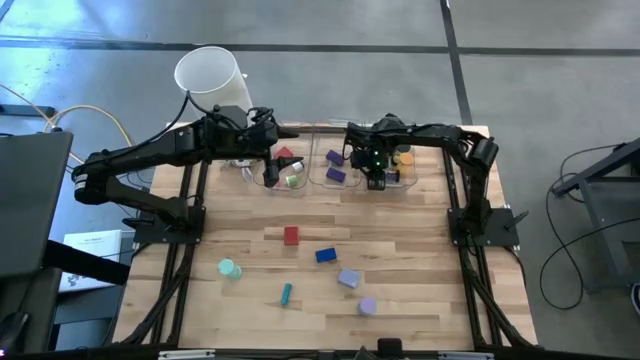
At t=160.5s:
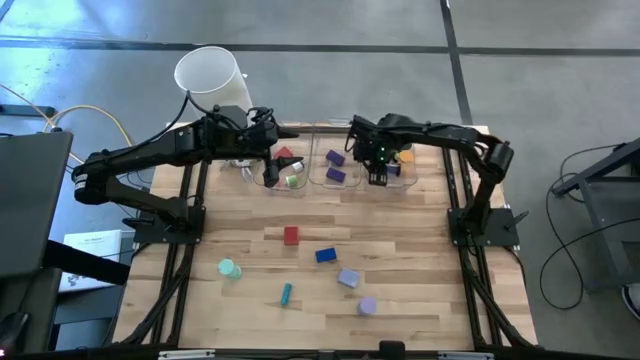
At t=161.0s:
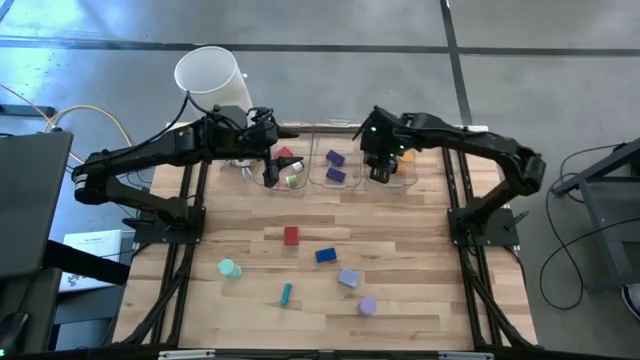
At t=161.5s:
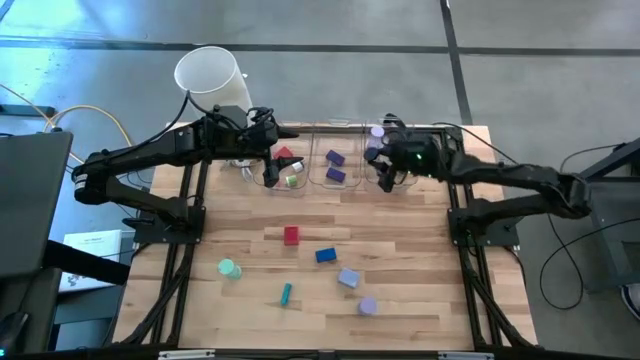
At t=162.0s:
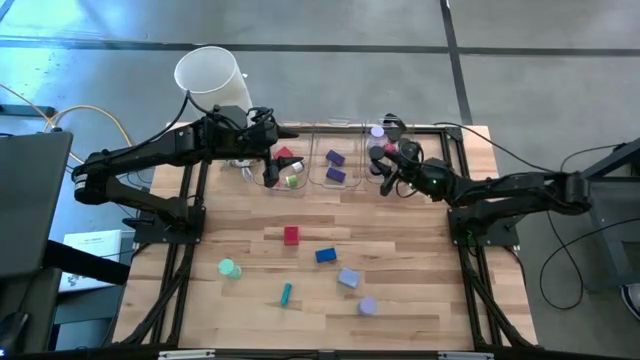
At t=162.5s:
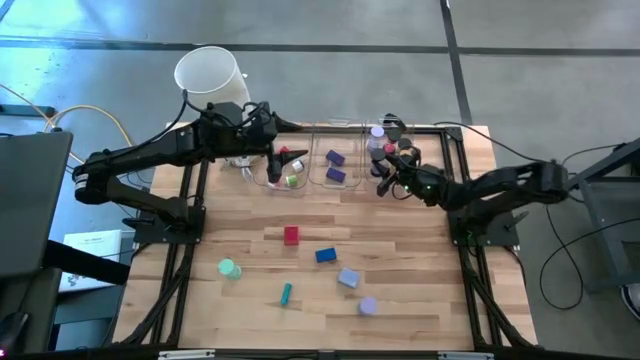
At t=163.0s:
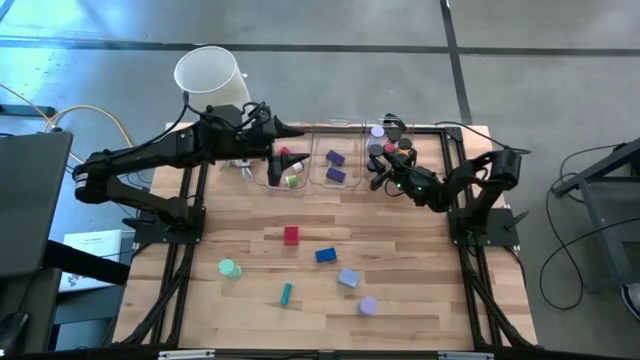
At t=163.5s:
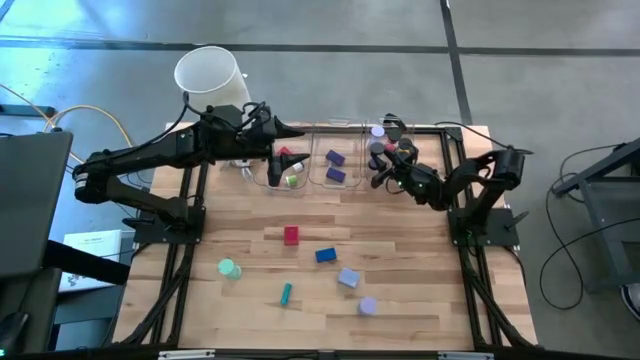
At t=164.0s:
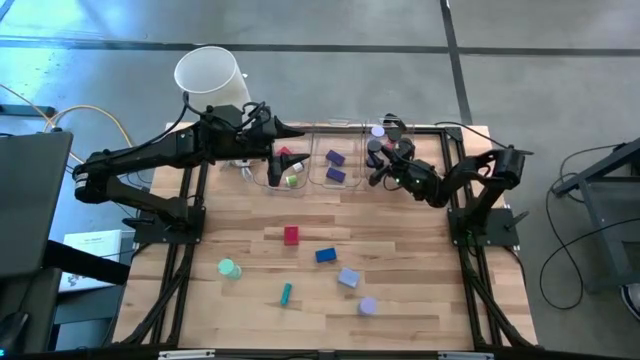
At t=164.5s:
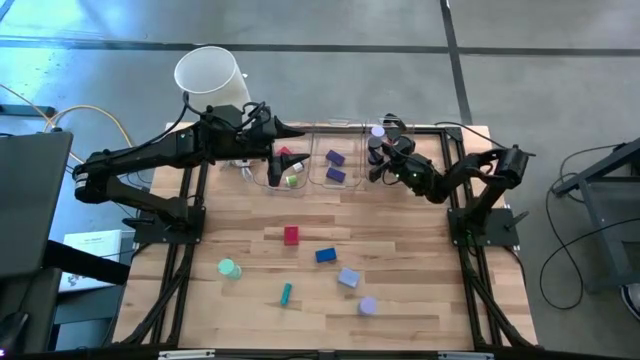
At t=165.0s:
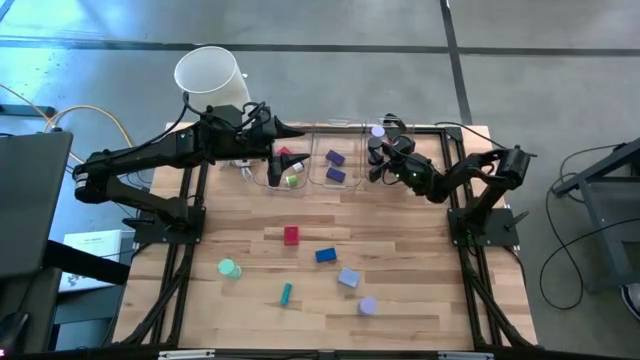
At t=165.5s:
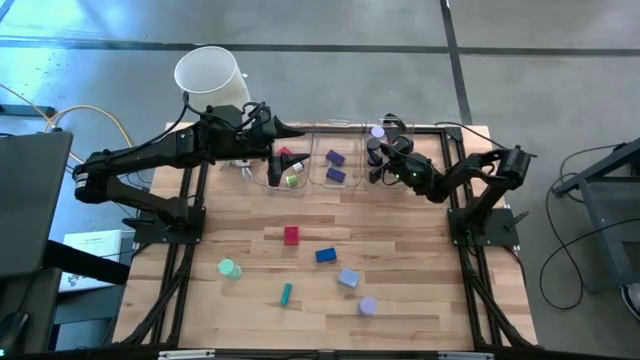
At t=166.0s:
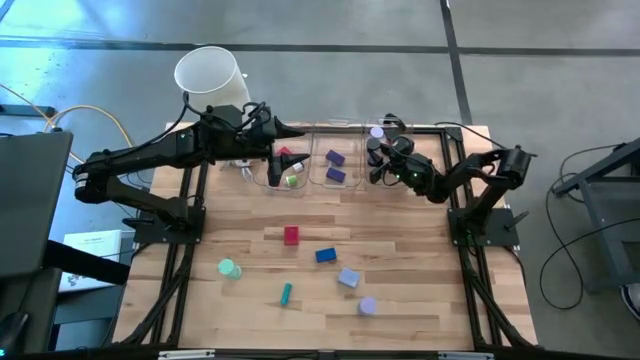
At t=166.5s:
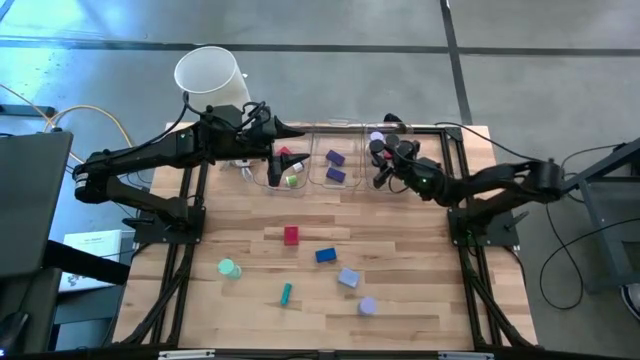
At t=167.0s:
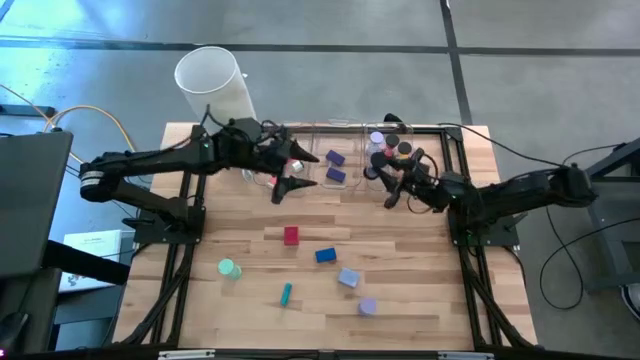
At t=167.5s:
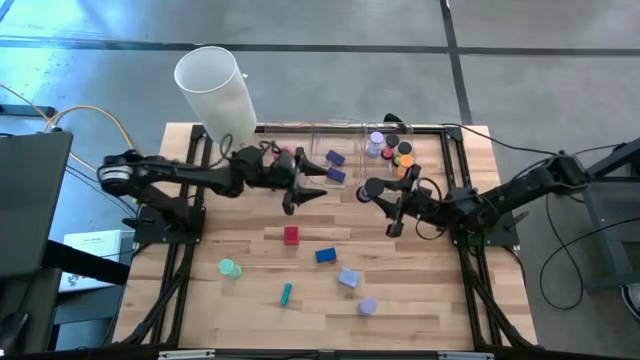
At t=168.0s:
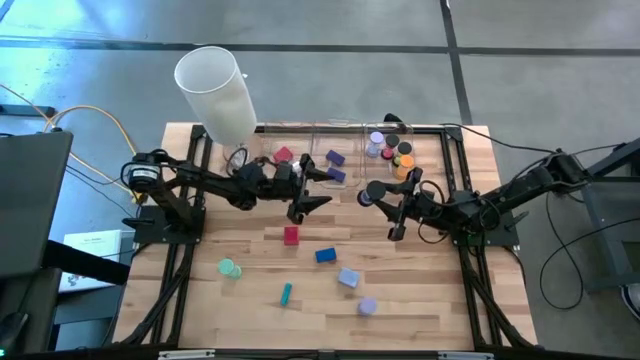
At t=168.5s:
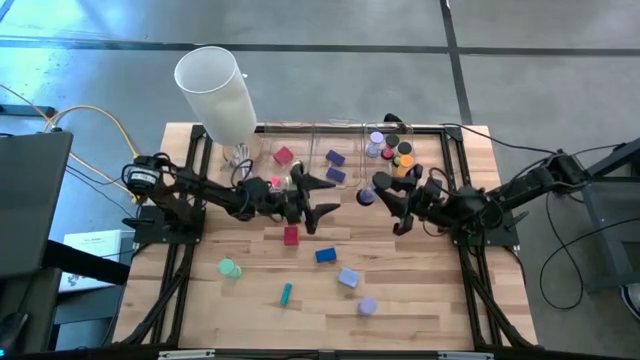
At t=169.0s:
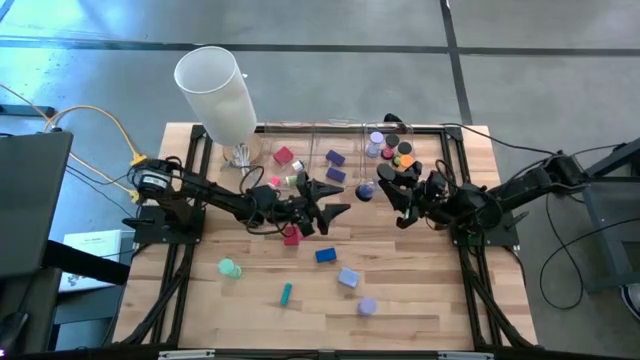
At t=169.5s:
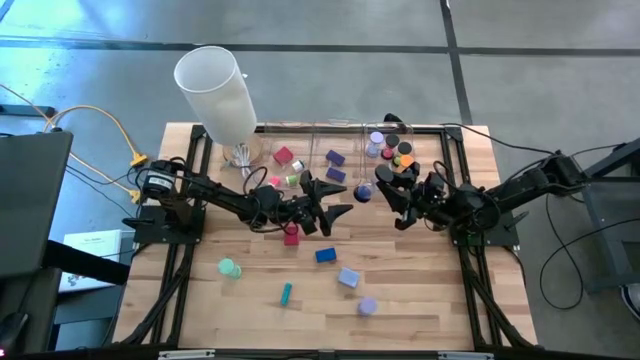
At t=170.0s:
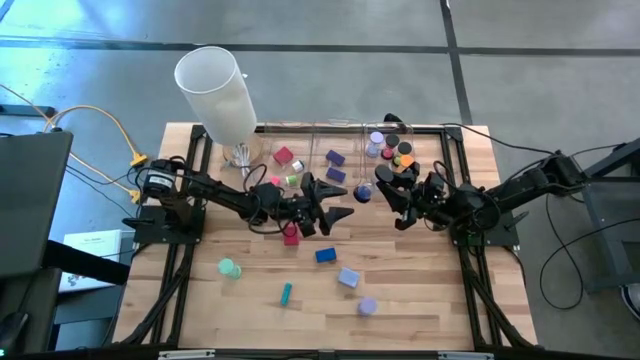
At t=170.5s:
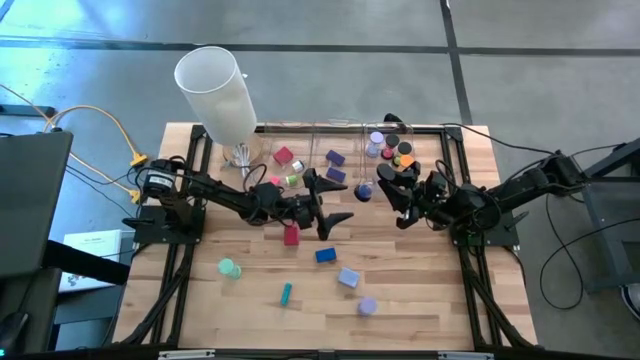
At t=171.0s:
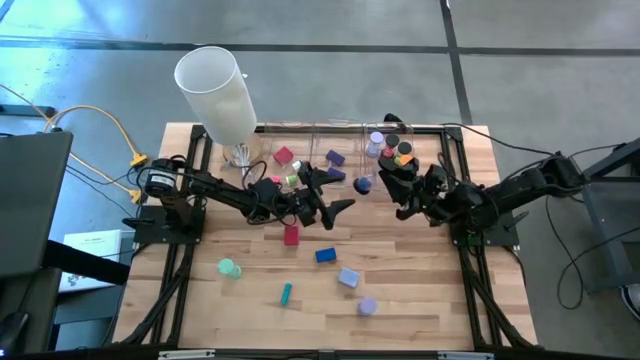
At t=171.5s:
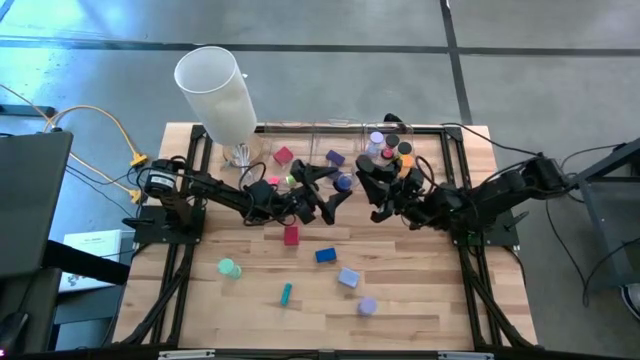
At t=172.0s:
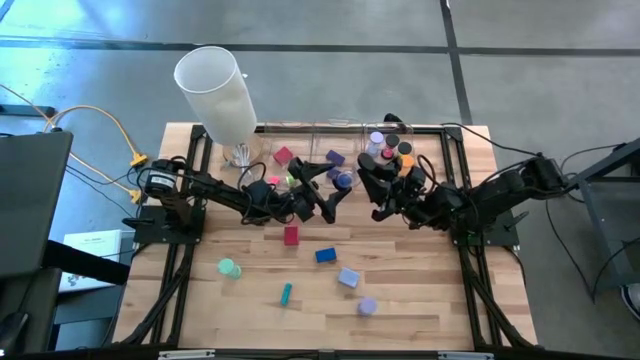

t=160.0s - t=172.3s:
Task: Pick & Place Office items
Put the blue hourglass into the right transparent bin

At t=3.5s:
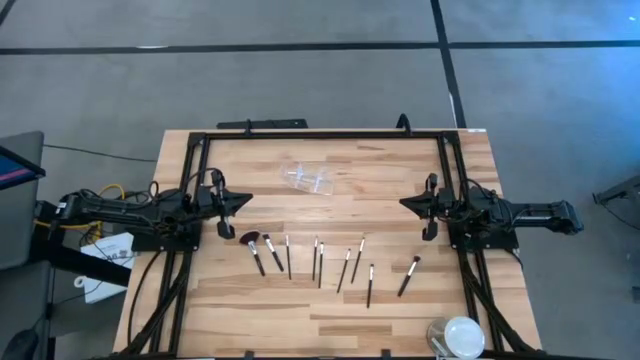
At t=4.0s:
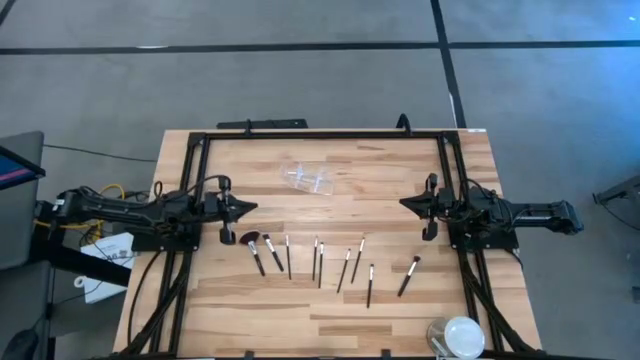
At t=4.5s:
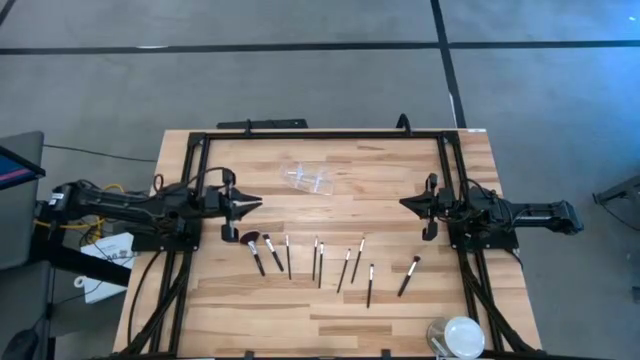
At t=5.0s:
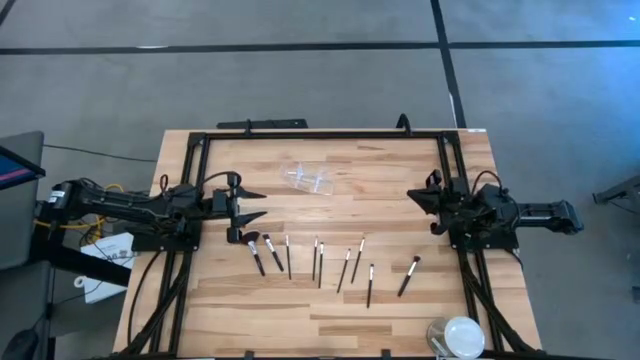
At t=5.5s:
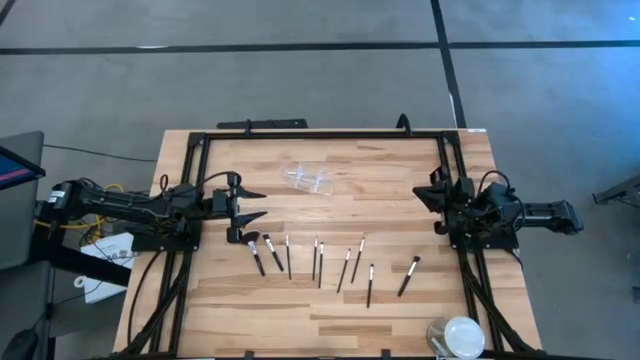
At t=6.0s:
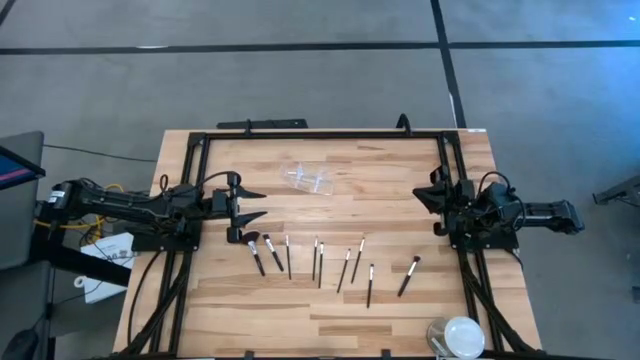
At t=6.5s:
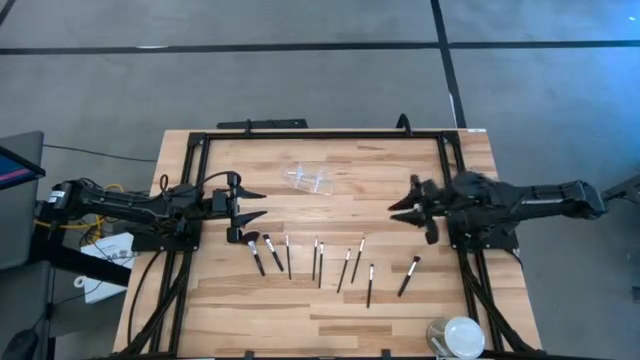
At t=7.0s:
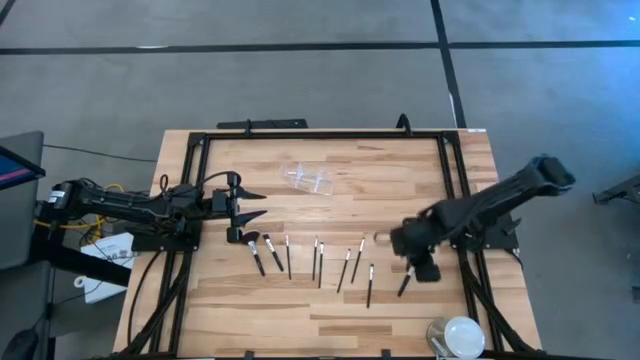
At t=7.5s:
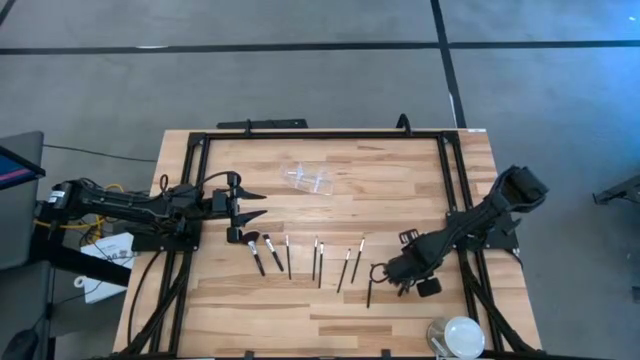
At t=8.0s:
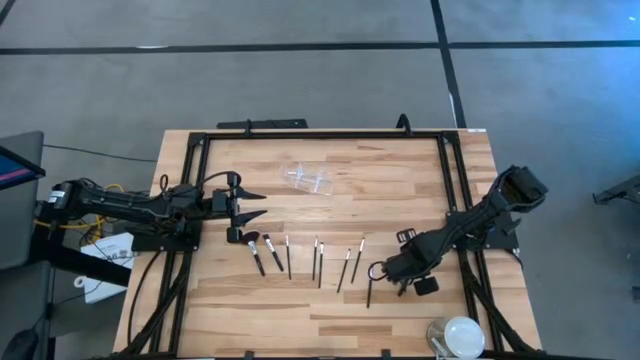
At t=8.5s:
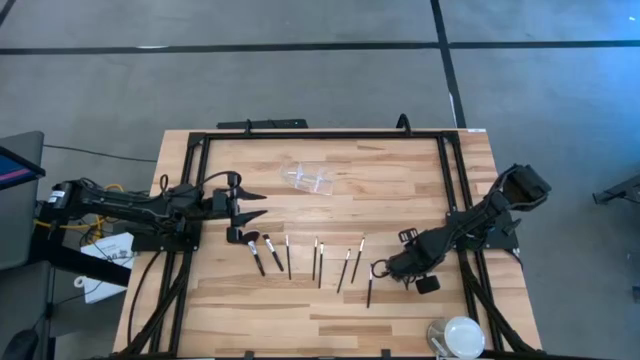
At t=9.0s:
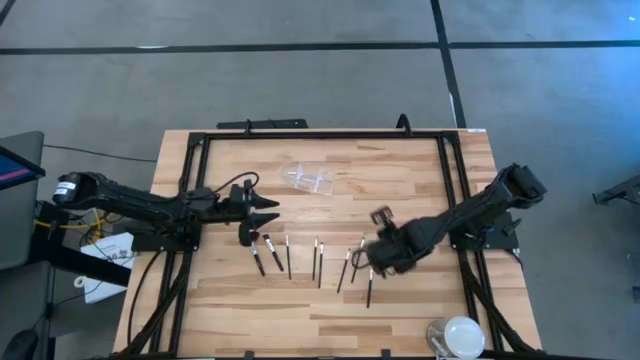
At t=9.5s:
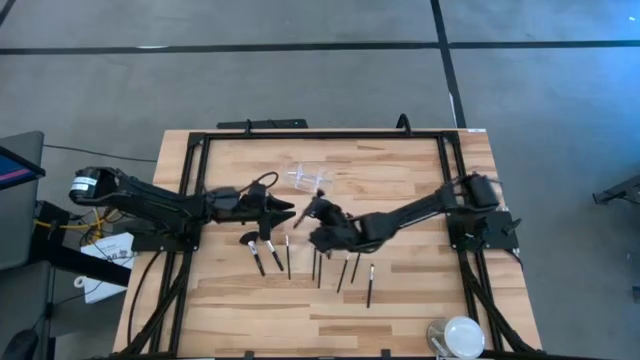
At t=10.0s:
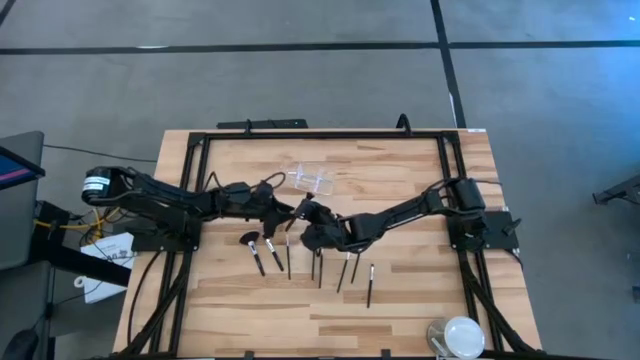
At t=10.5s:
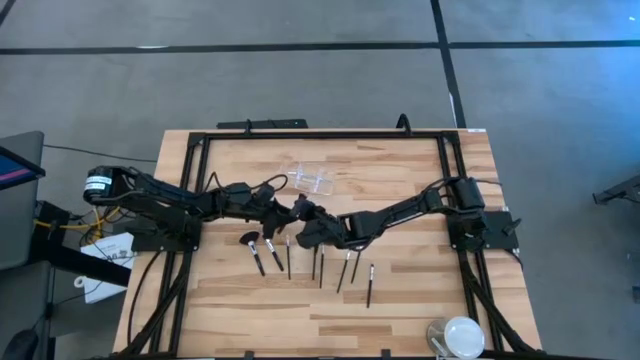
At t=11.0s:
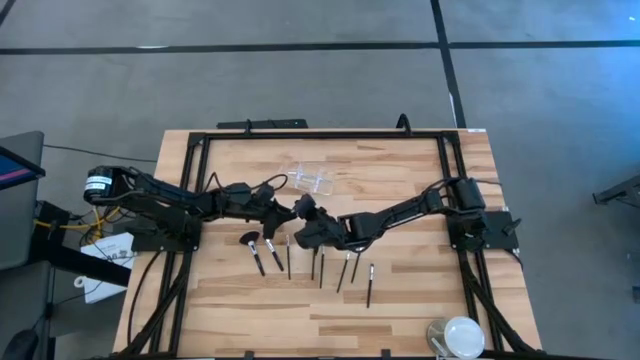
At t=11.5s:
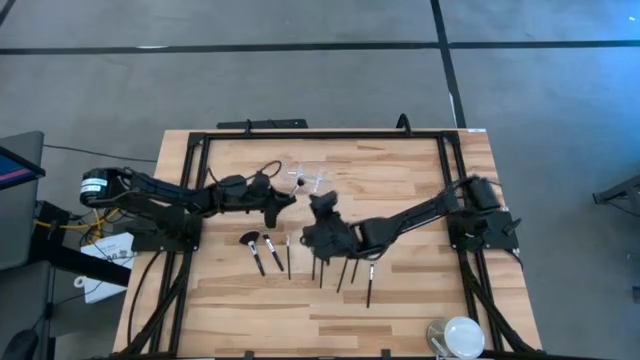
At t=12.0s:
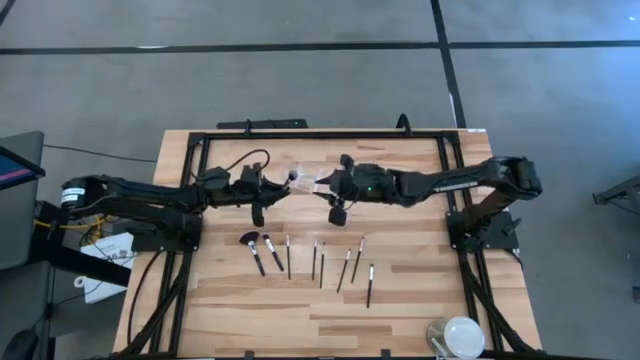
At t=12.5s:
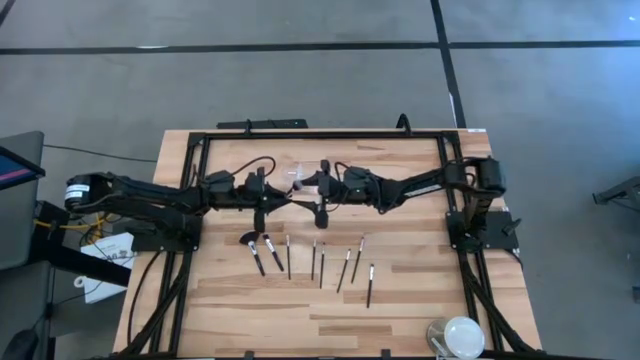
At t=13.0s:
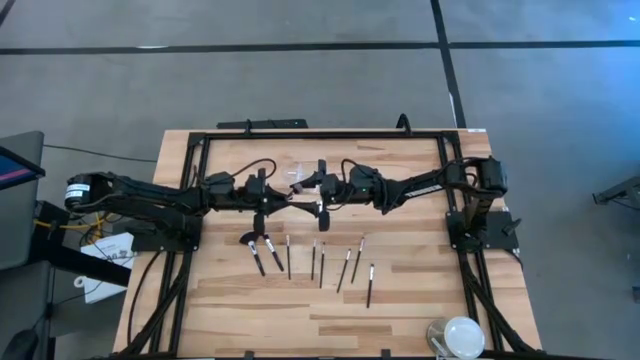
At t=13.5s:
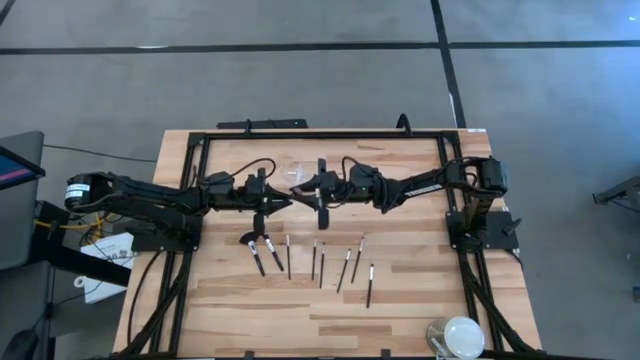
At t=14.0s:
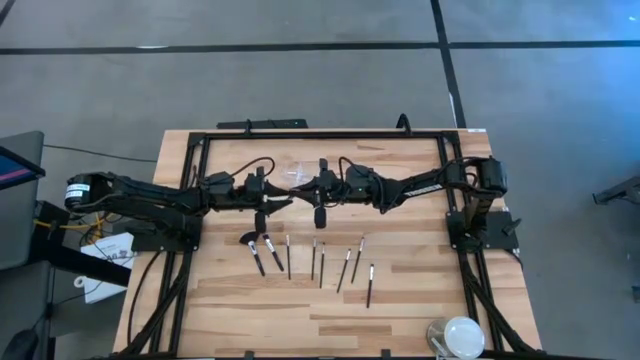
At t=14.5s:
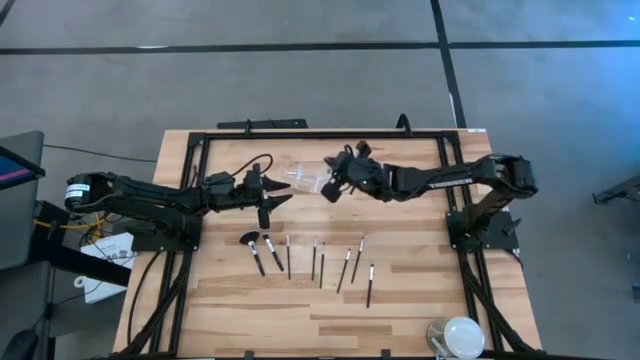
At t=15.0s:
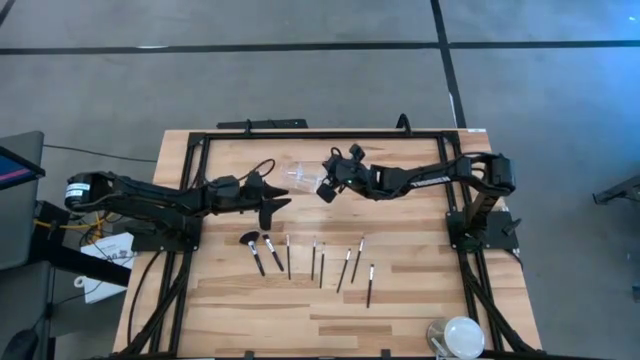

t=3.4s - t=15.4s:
Task: Sort items
Put the powder brush into the transparent organizer
